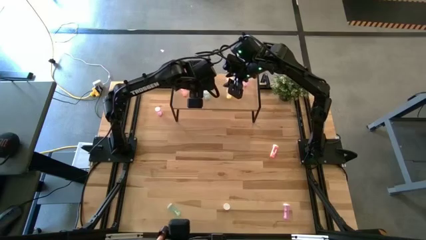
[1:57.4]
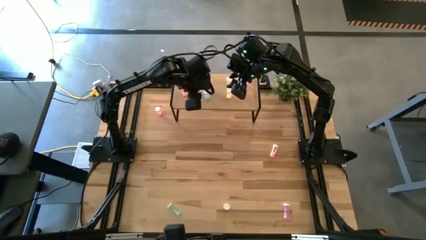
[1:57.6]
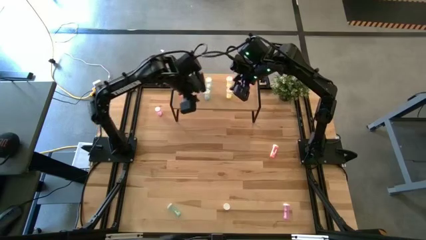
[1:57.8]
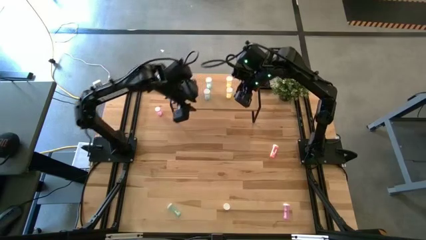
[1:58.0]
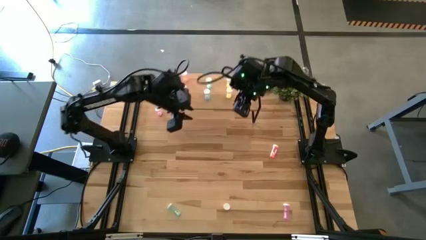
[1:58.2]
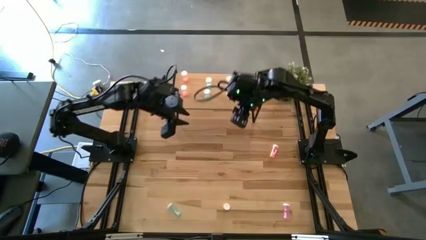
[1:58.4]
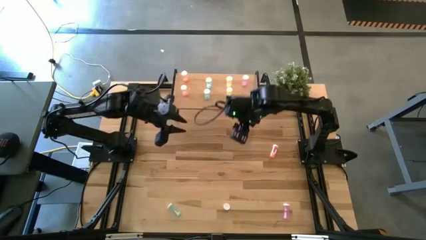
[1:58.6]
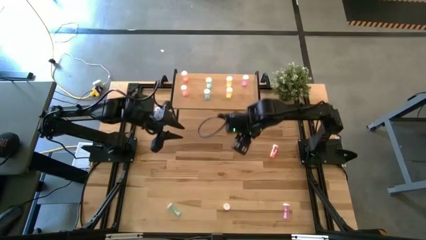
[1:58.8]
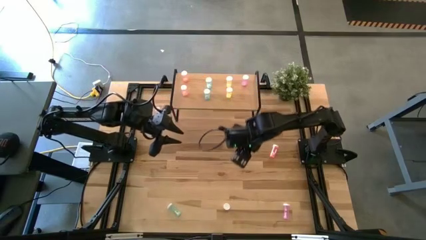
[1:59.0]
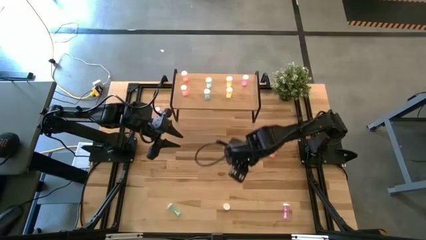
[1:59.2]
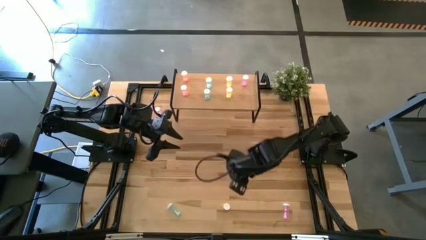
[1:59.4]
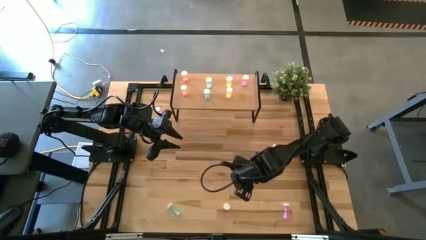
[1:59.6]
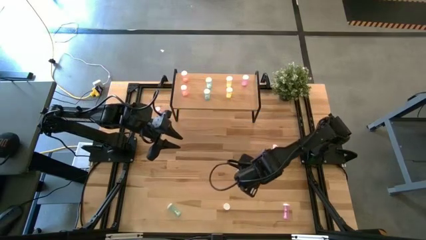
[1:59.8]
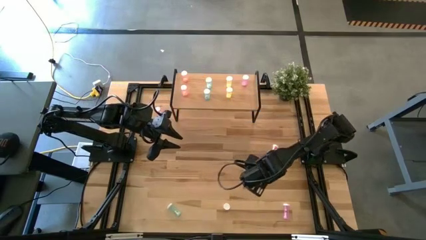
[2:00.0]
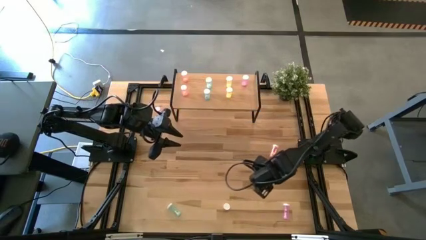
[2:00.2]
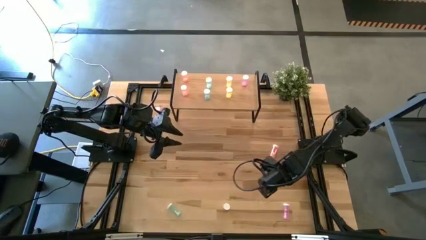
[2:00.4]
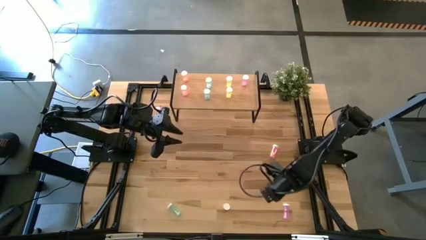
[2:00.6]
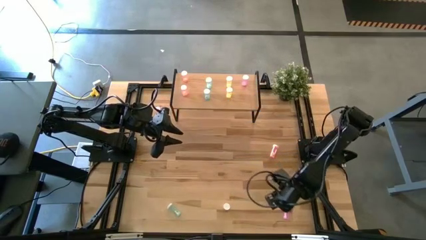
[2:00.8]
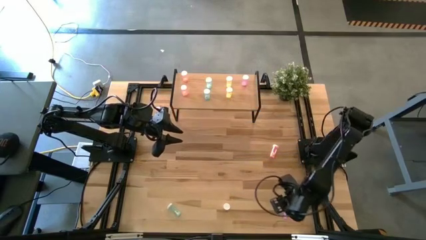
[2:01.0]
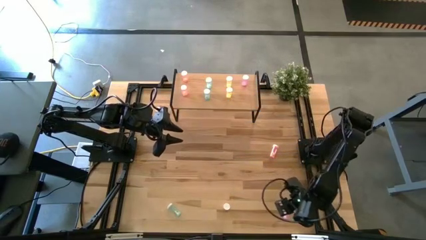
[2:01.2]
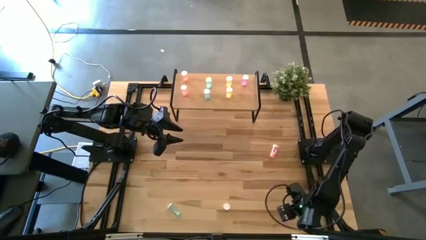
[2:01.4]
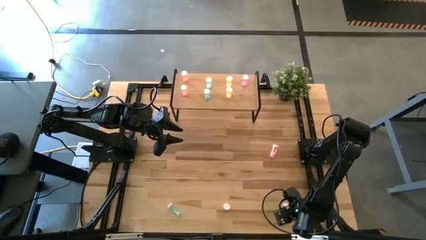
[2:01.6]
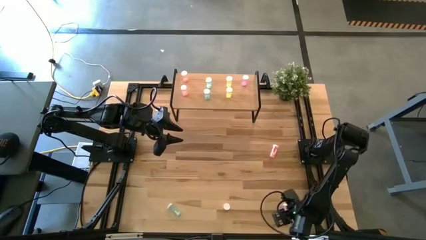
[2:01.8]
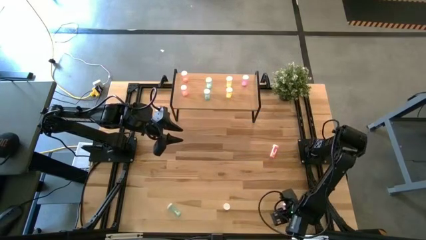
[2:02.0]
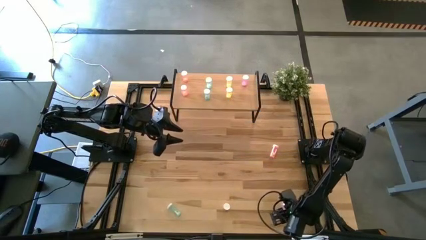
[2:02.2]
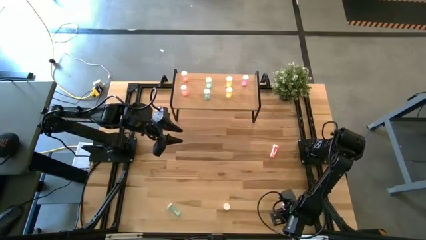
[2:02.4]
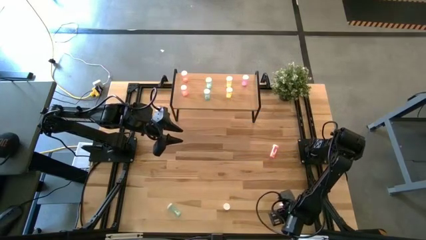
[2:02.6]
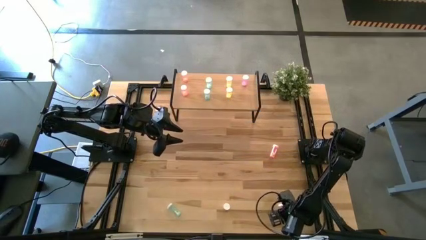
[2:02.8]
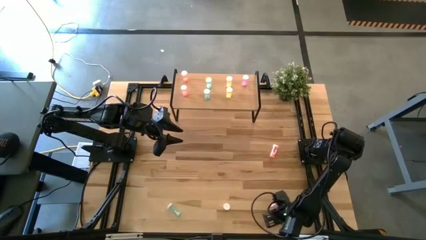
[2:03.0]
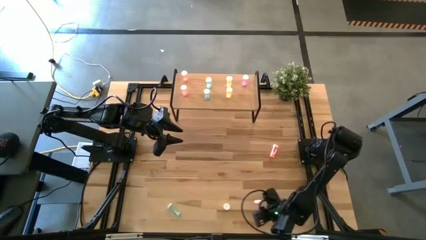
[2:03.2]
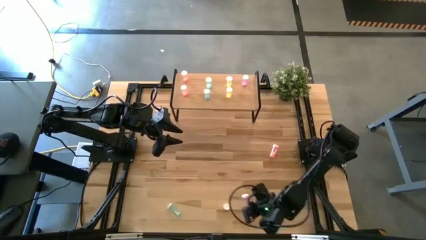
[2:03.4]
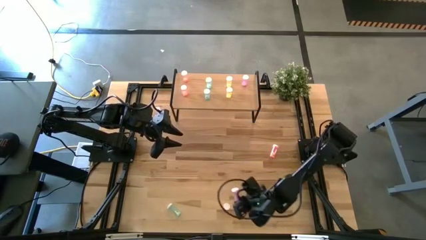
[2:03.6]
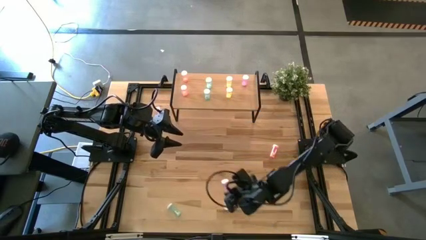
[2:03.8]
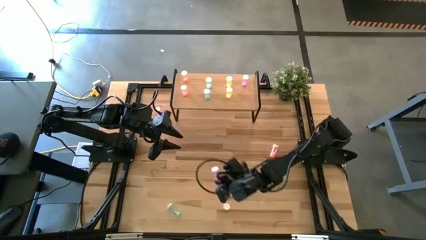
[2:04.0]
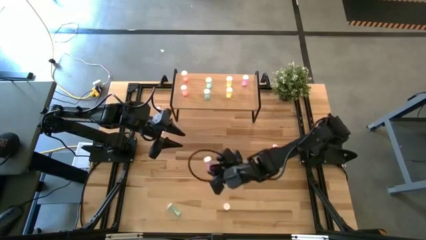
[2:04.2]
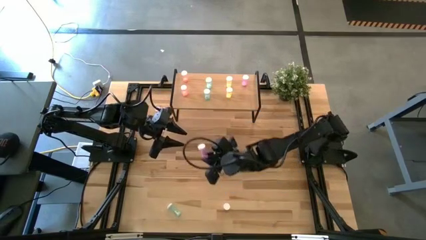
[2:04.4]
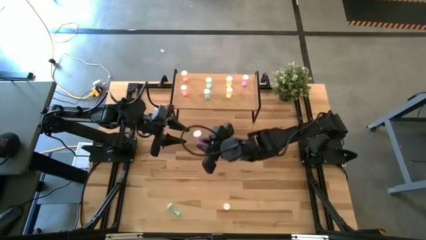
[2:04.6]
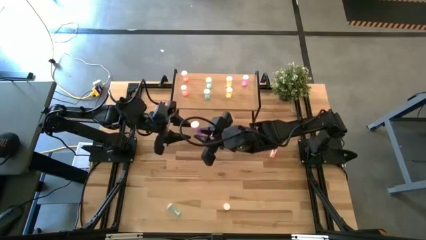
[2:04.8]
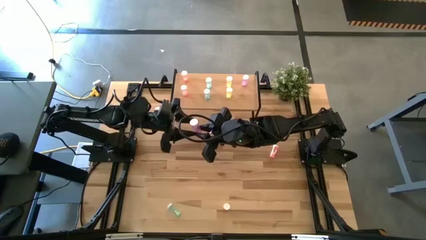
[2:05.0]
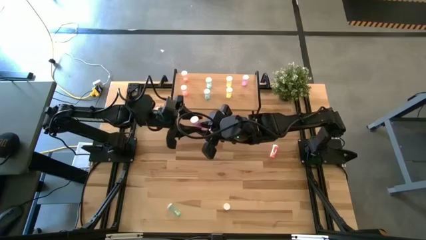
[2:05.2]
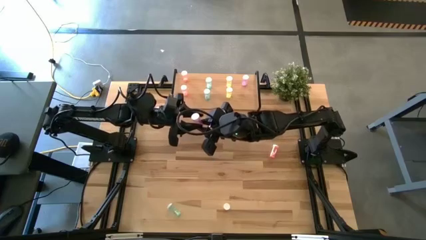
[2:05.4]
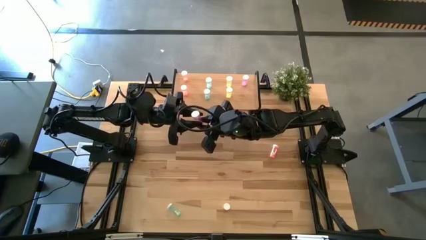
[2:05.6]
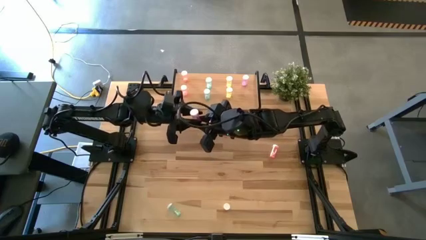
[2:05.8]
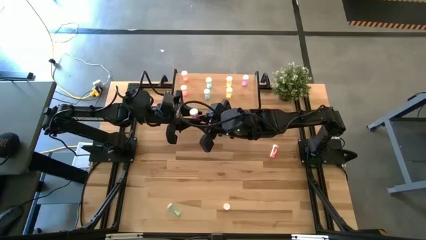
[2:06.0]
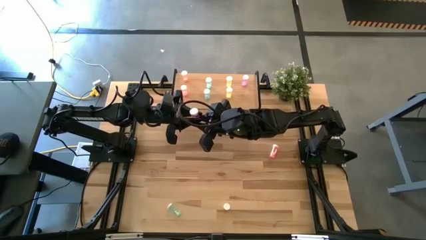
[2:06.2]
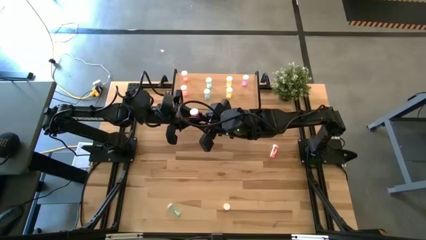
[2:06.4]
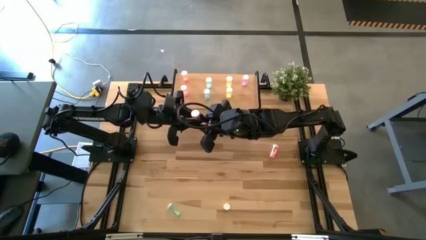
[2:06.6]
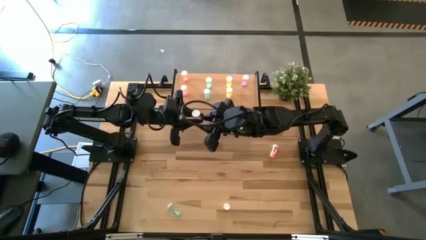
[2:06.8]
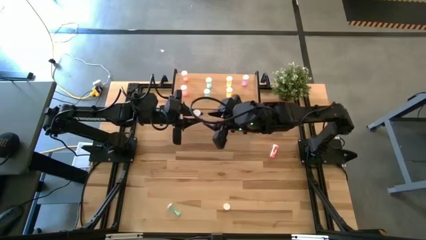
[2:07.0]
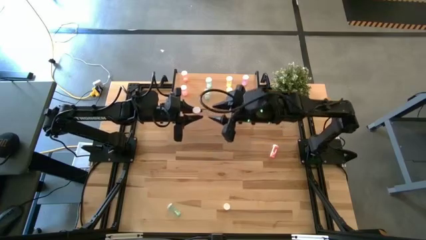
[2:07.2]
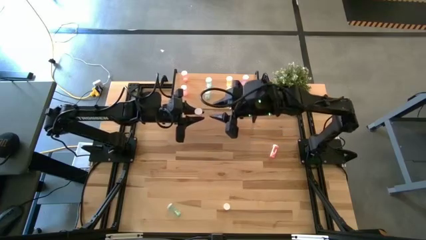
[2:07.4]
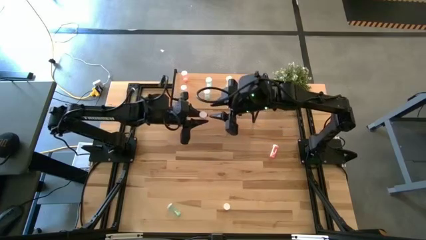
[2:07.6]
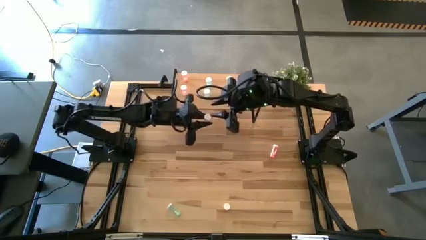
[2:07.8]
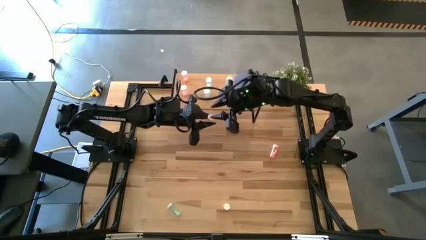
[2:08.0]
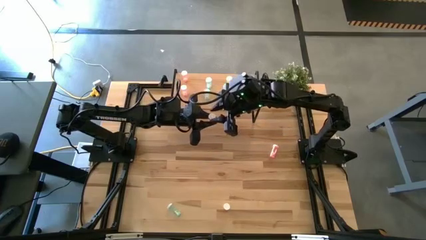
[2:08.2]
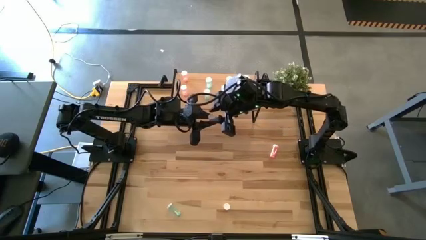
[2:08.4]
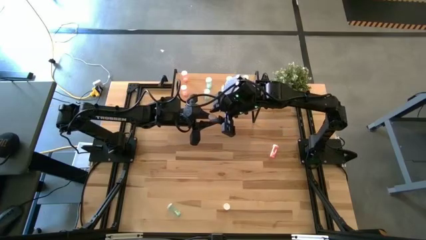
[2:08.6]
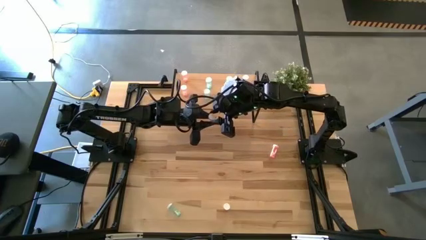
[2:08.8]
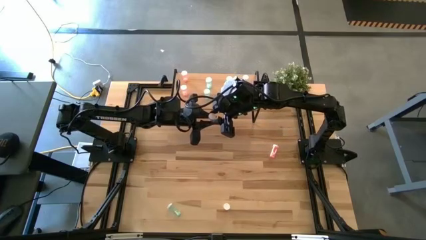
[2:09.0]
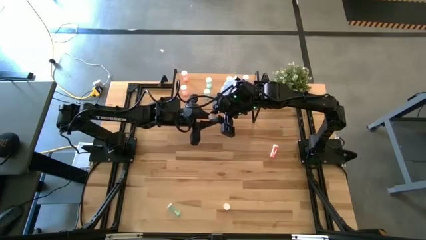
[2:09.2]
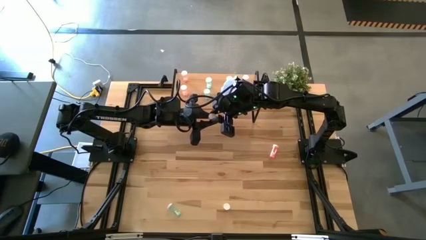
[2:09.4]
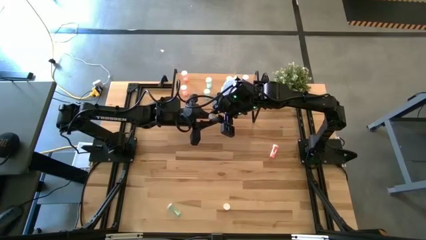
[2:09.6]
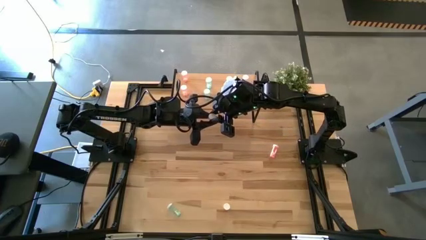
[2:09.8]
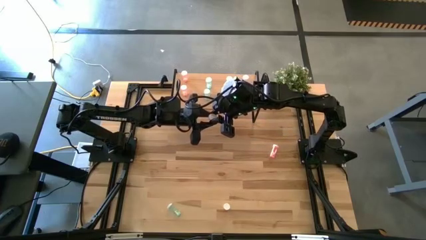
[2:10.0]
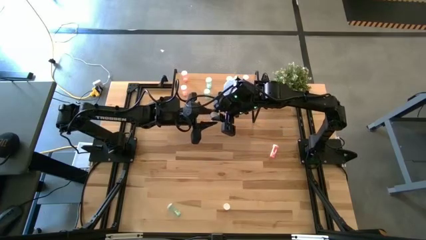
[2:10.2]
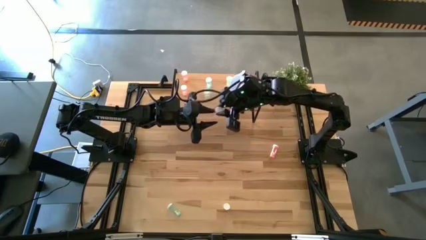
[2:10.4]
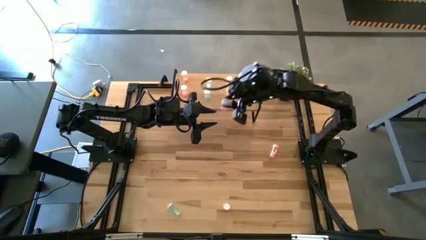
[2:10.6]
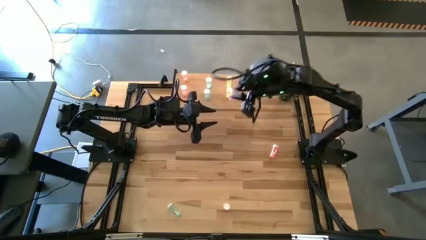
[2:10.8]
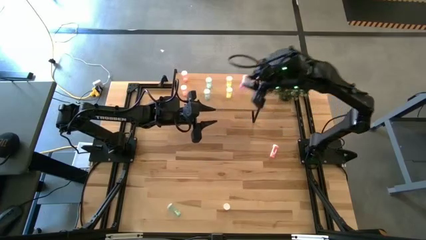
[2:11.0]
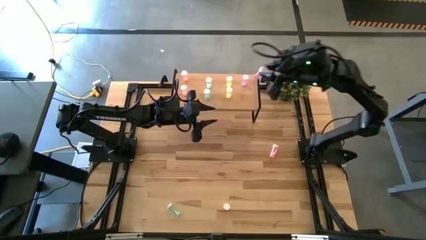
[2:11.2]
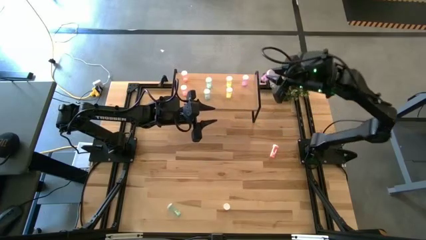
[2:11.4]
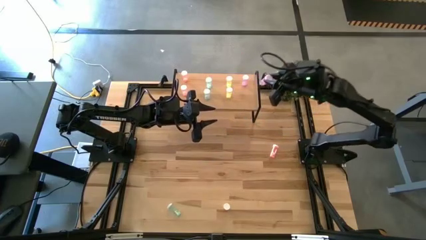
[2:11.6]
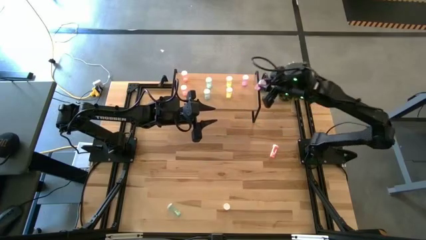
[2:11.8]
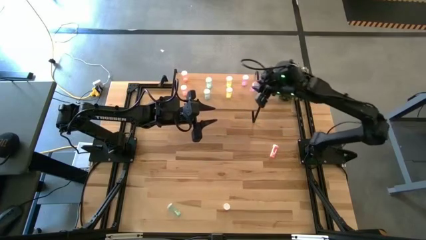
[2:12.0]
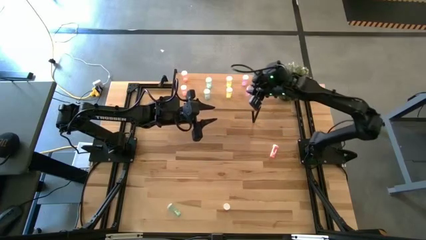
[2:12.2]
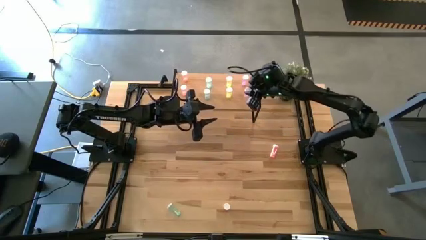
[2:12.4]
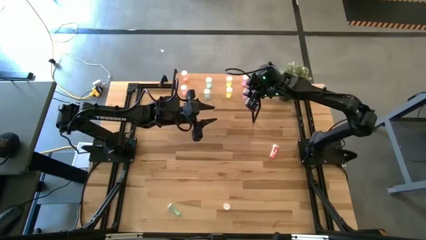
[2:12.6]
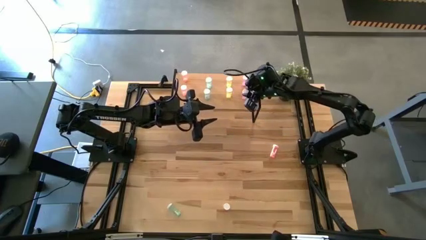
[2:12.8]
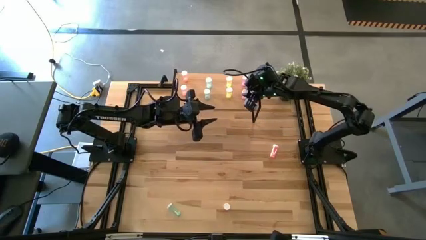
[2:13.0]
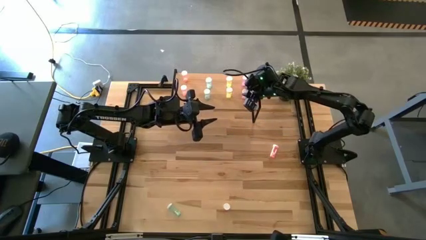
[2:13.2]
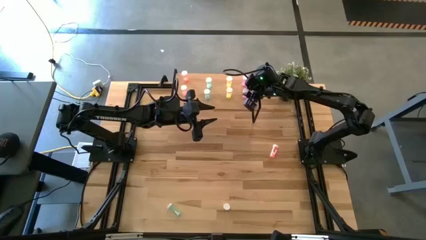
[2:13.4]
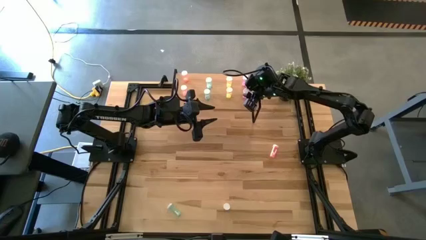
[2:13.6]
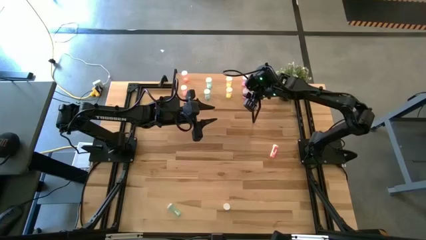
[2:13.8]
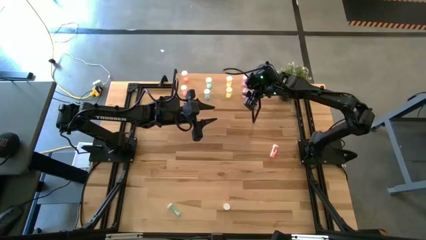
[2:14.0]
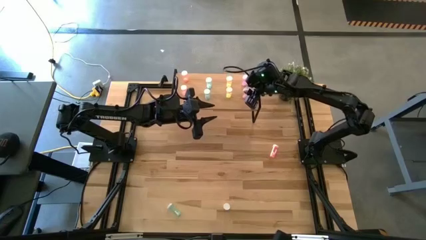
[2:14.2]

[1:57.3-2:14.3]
Task: Pick and place medicine bottles onto shelf by color
Put the bottom purple pill bottle on the shelf aligned with the other purple pill bottle
